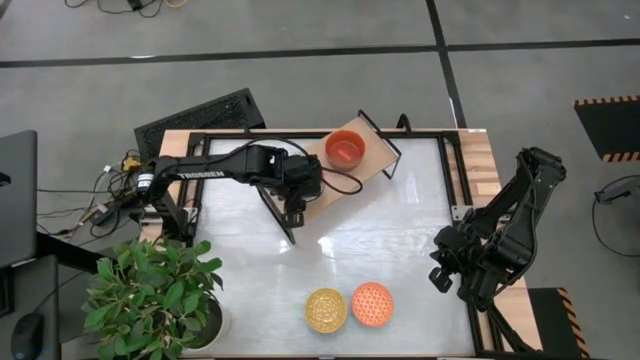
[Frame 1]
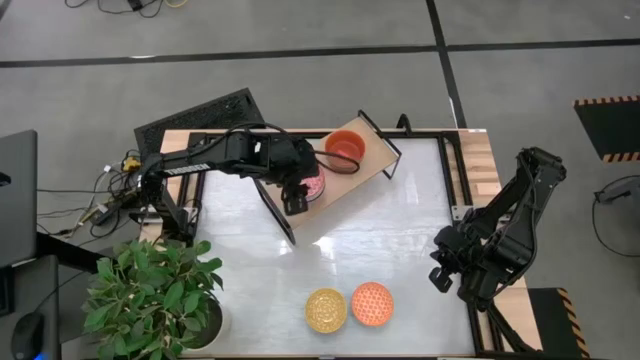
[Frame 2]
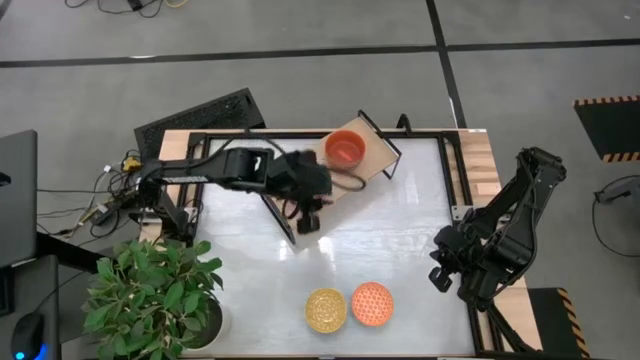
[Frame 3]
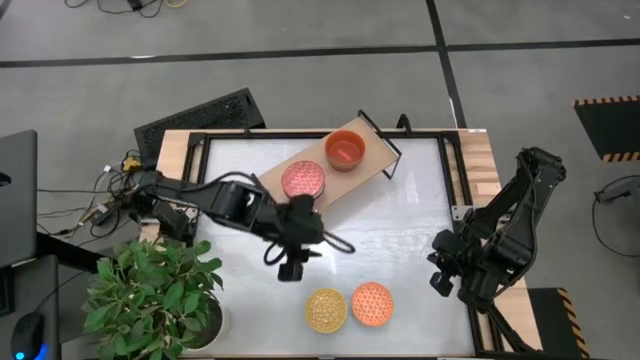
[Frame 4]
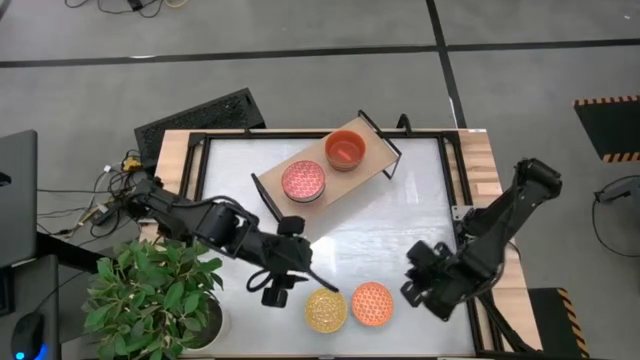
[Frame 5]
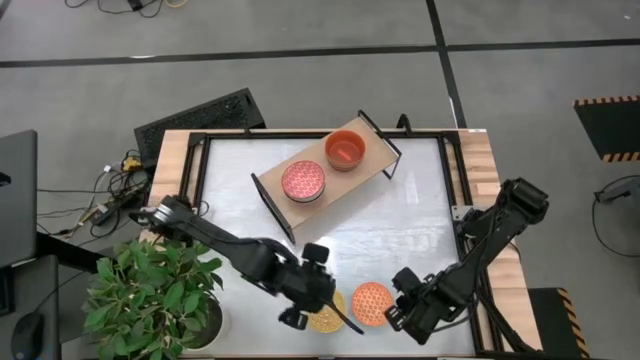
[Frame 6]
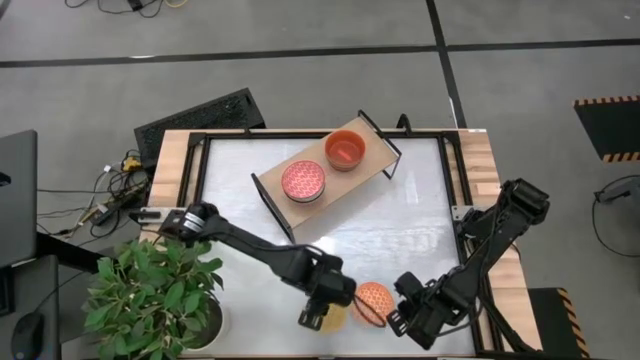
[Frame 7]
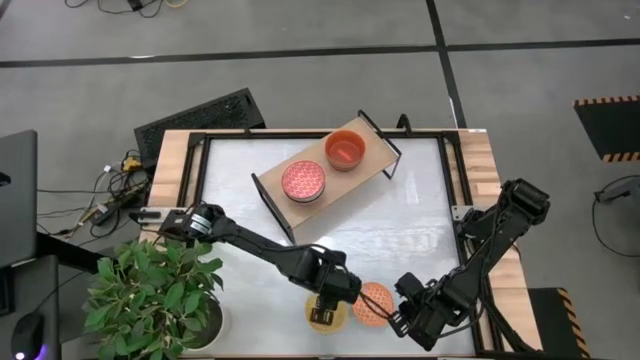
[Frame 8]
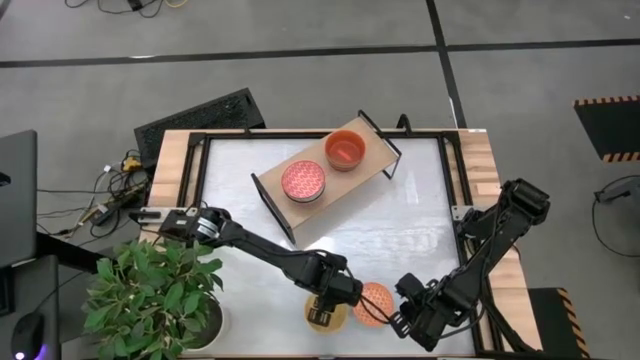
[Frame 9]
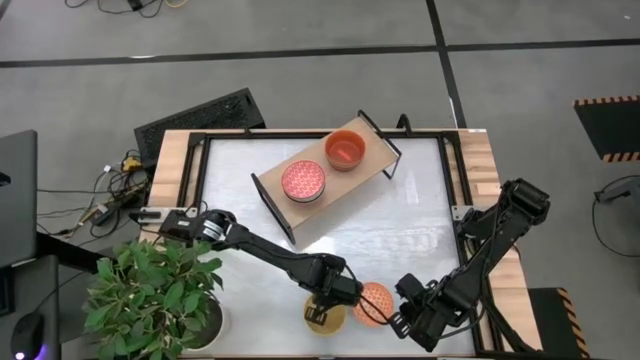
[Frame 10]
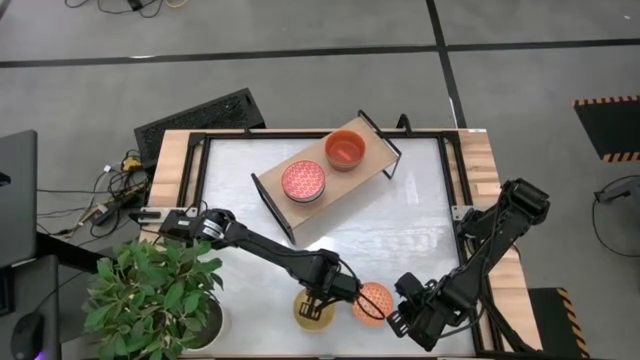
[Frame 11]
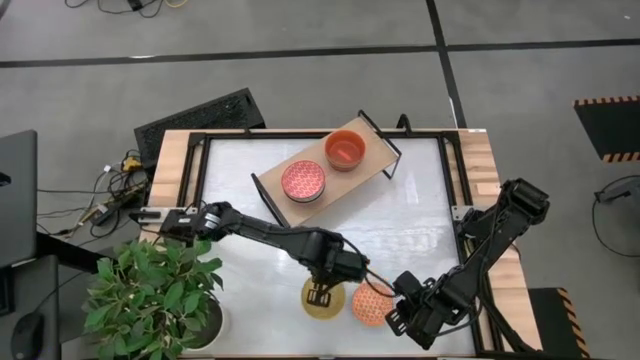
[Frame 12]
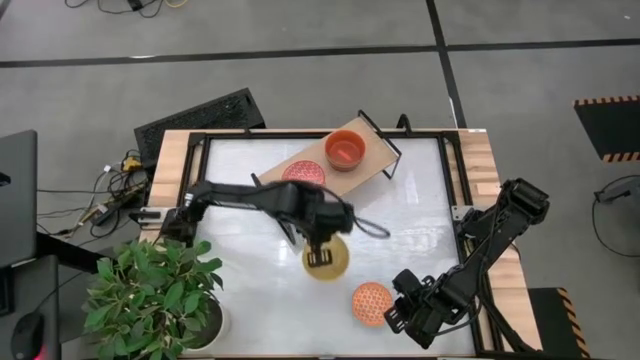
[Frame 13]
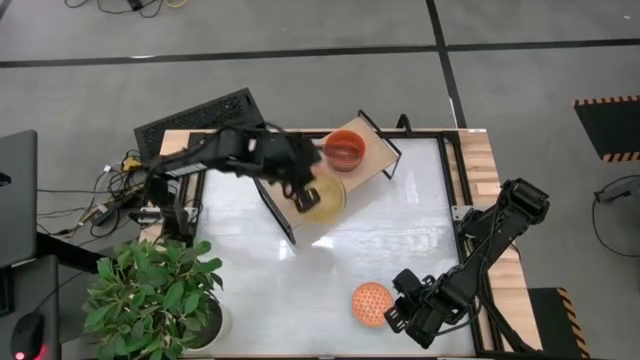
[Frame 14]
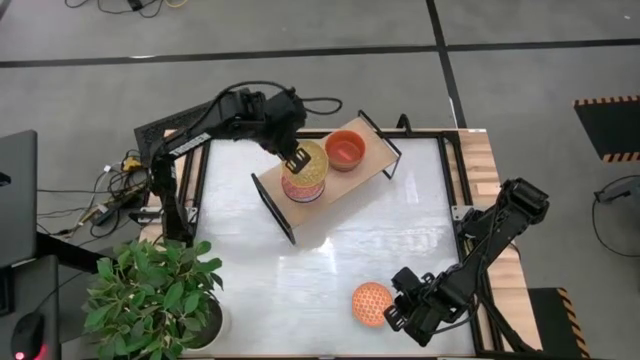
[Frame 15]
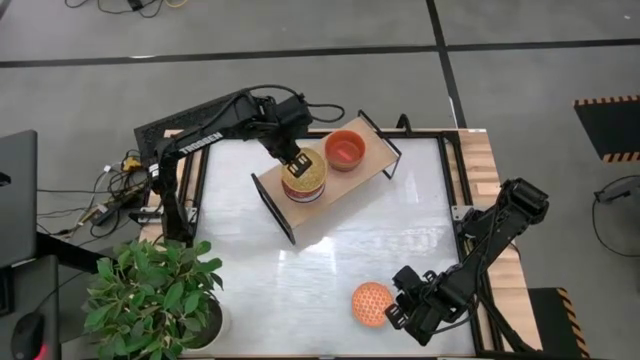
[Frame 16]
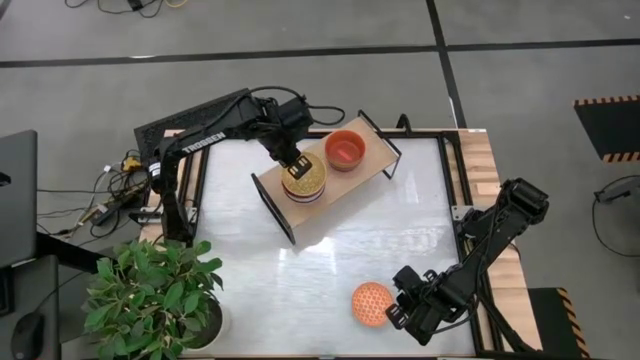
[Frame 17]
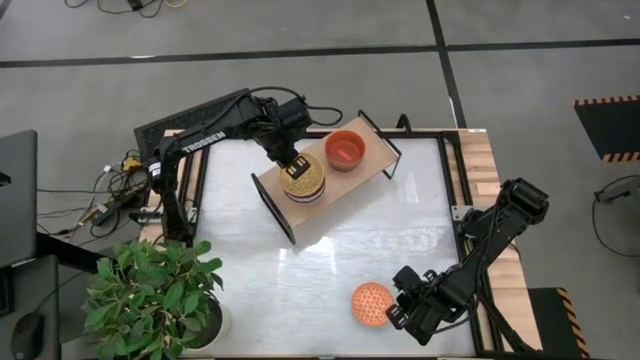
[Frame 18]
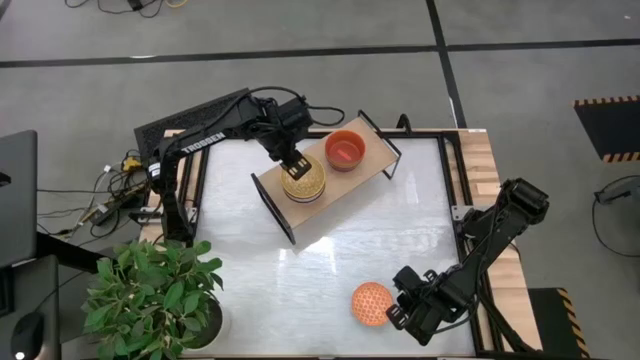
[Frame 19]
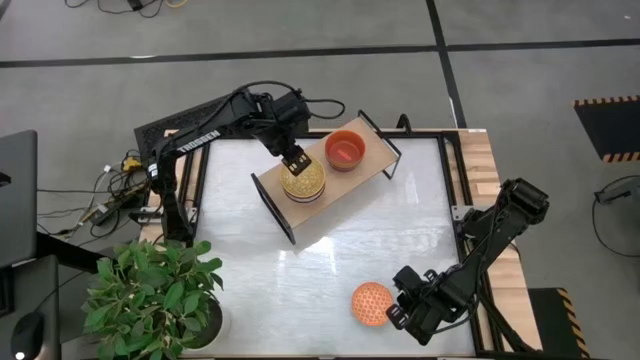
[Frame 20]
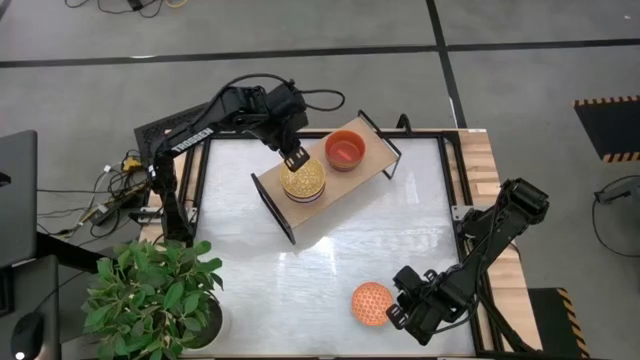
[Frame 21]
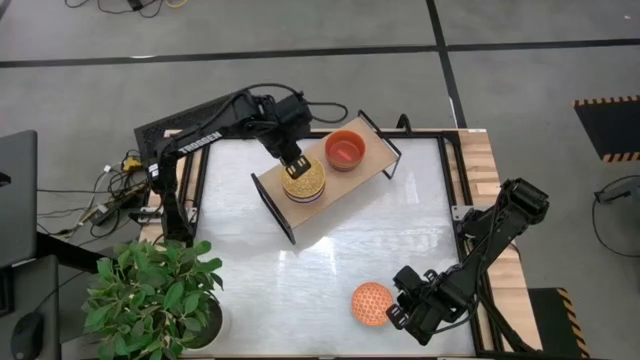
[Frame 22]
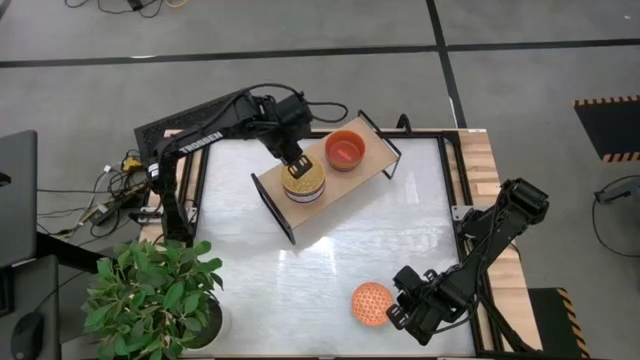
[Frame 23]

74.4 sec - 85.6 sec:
Task: Place and stack bowls onto a shelf
Stack the patterned yellow bowl on top of the patterned red bowl on the shelf

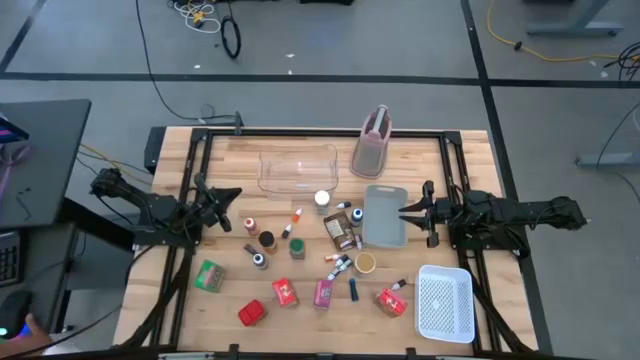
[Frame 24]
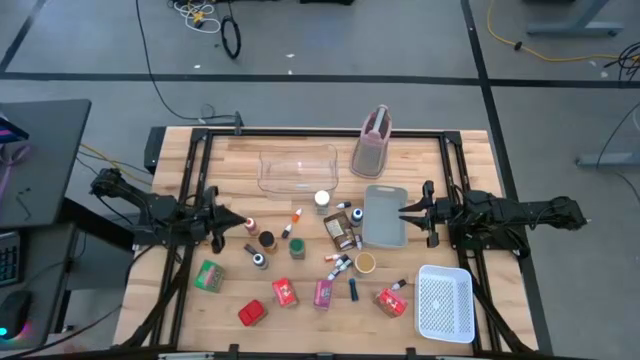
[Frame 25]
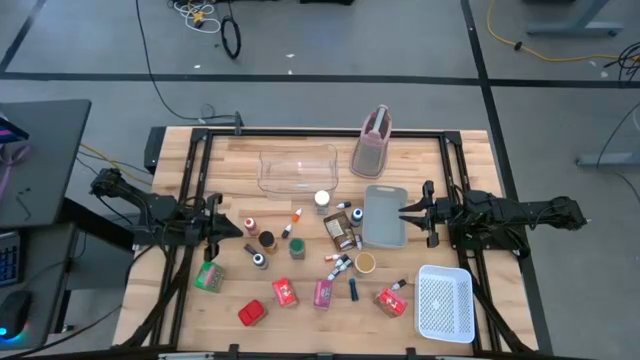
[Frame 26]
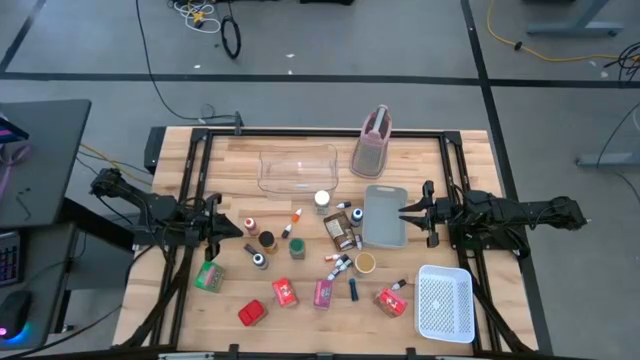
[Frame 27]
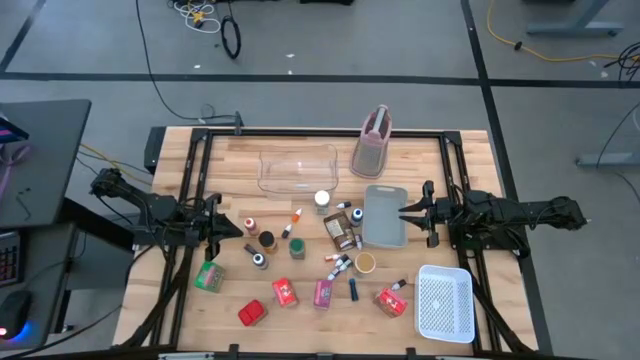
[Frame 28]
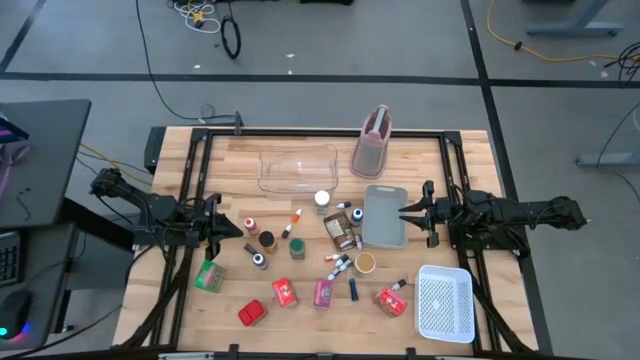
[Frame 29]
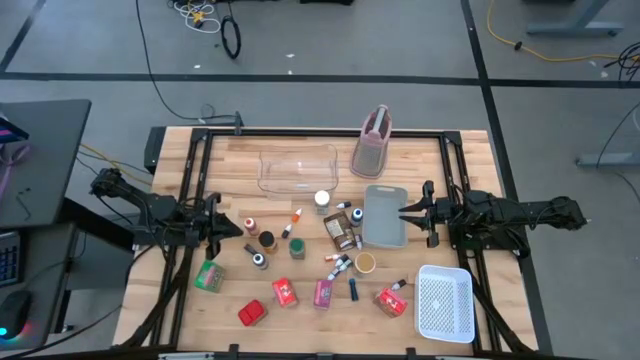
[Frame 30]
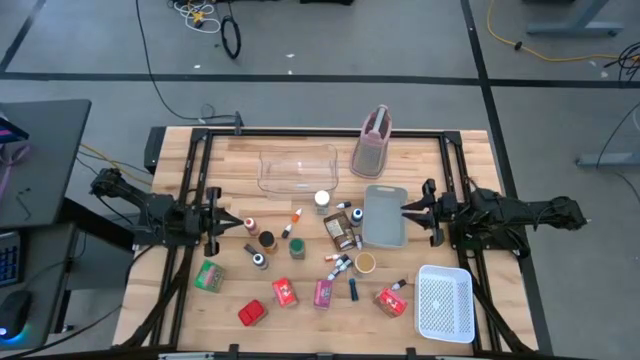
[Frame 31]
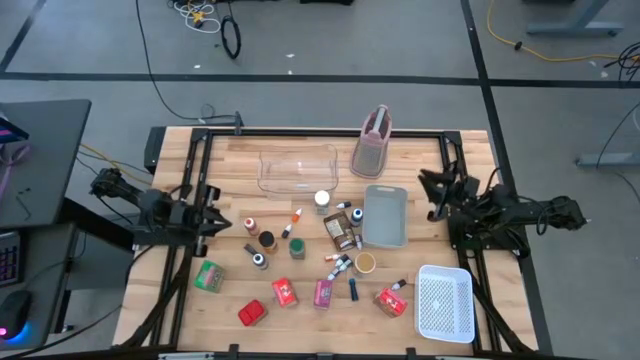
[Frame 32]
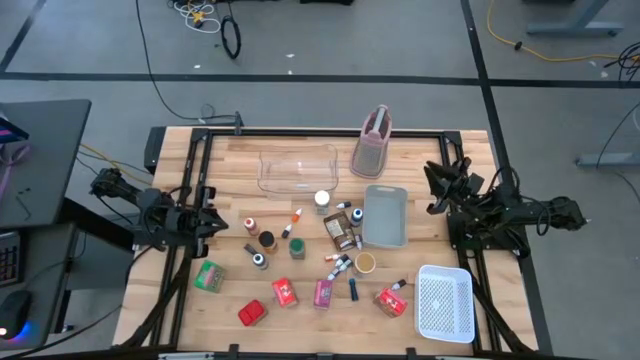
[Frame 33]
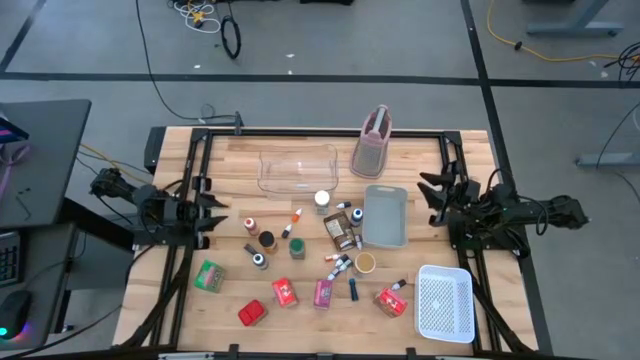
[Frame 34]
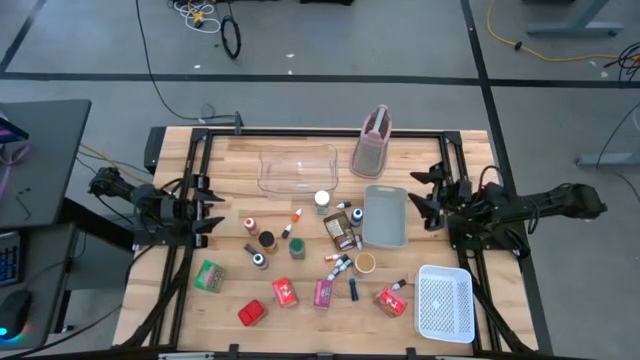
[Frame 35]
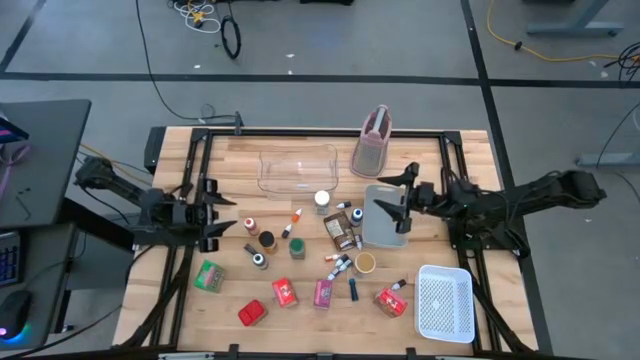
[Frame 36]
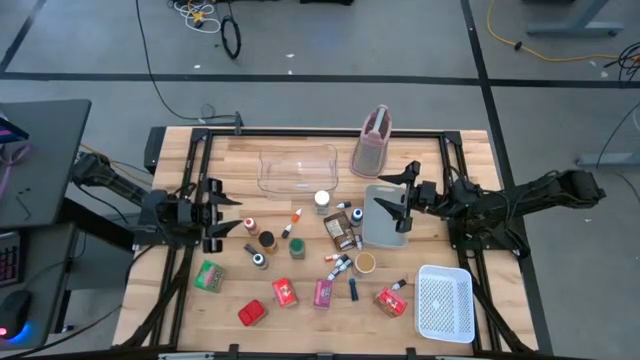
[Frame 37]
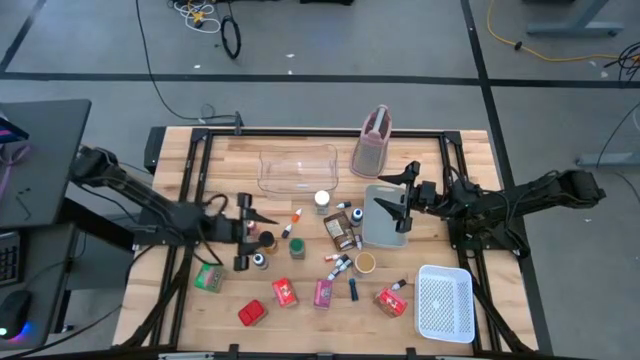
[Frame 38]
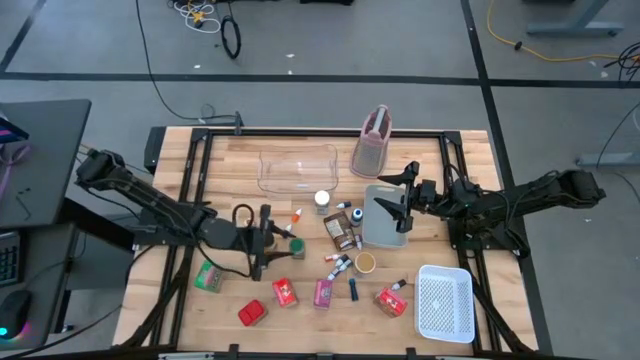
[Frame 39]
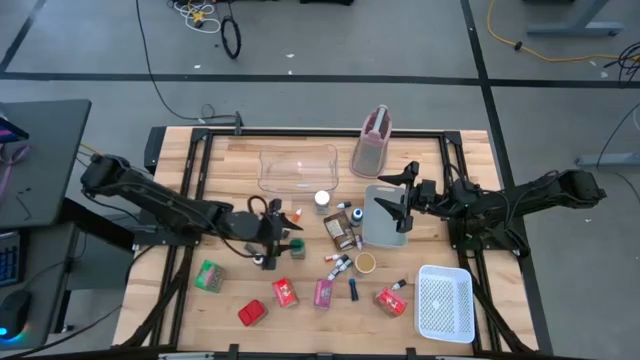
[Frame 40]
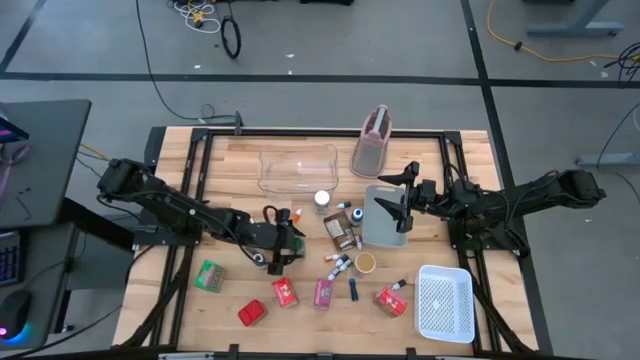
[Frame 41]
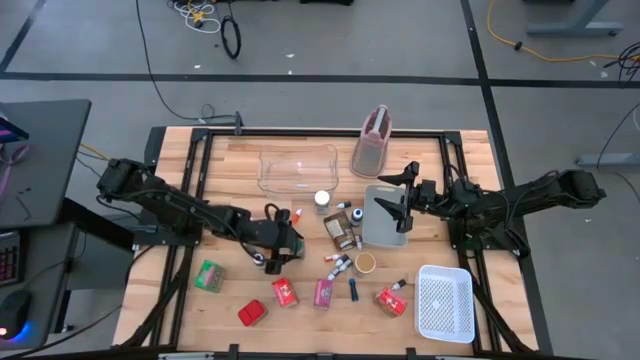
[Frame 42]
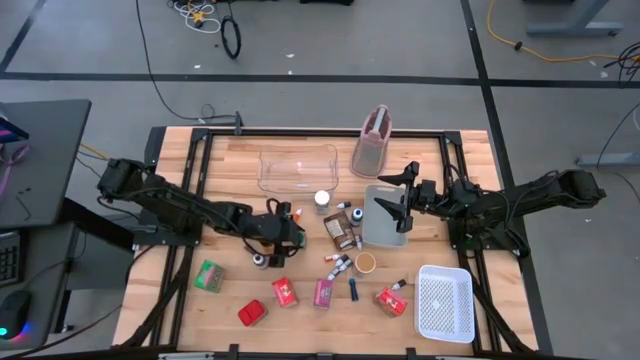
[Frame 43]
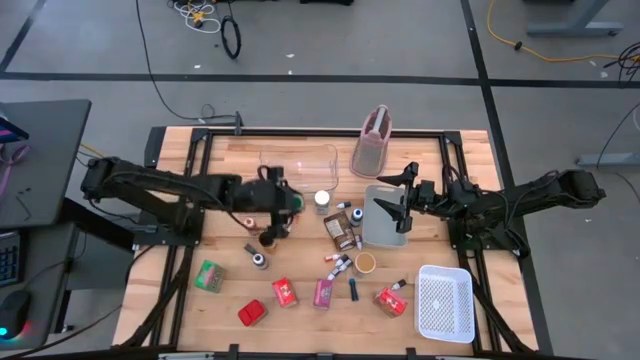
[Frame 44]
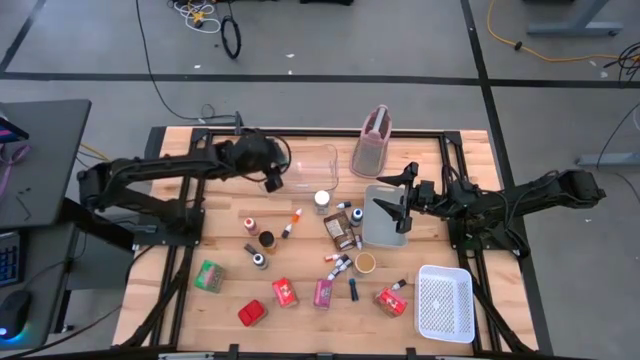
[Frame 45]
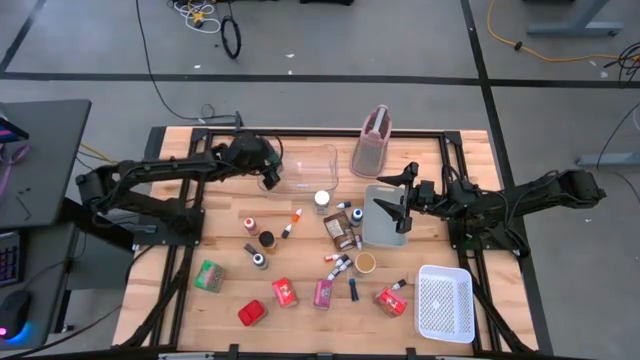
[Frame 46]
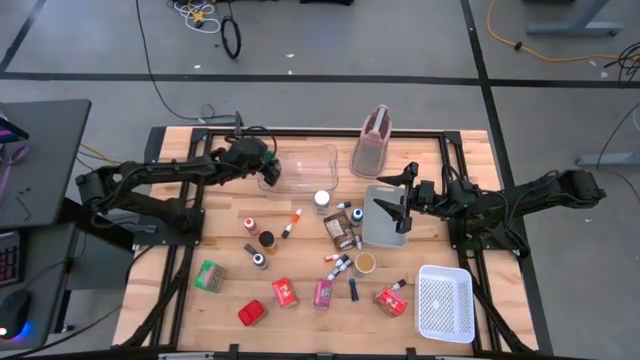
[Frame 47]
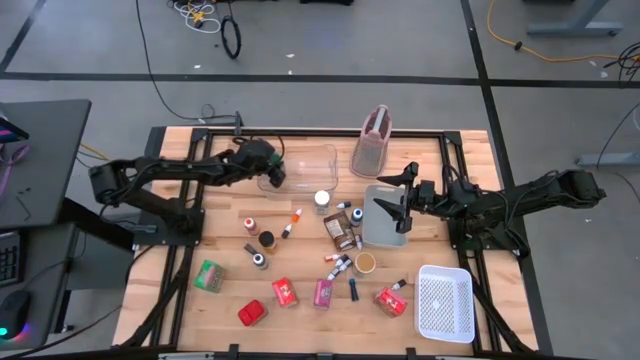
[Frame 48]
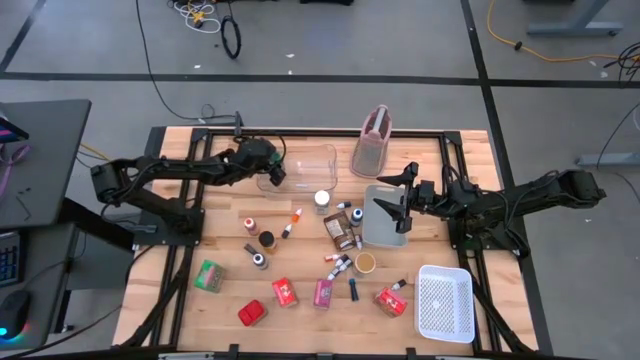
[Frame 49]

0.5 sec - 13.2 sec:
Task: Pick & Place Kitchen Items
Put the green seasoning bottle into the transparent bin
